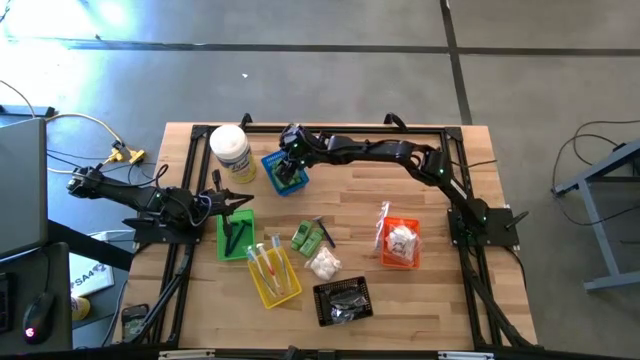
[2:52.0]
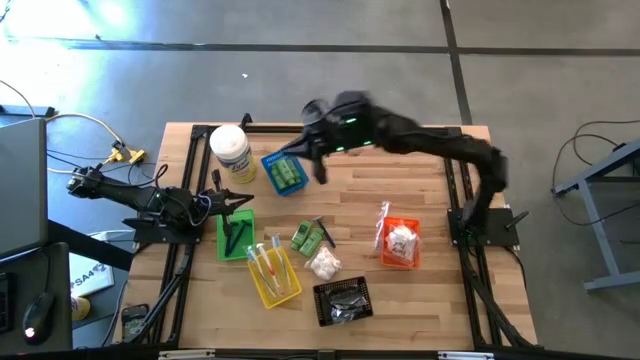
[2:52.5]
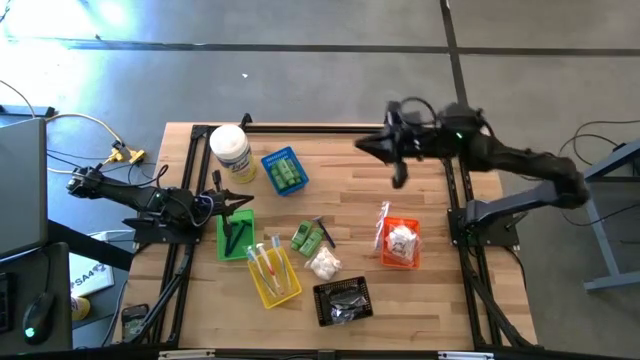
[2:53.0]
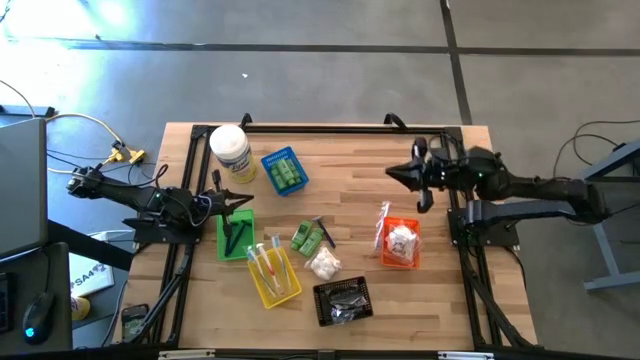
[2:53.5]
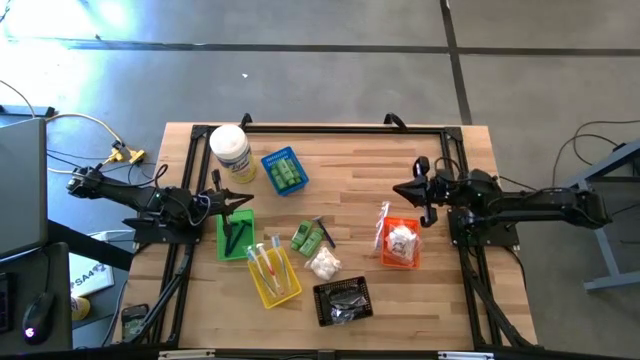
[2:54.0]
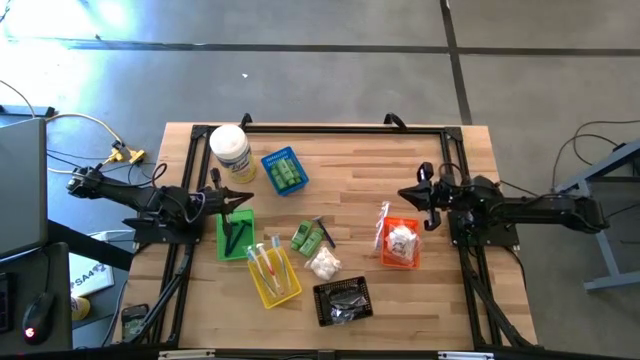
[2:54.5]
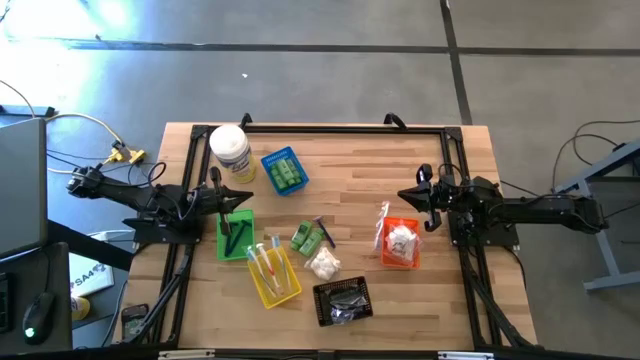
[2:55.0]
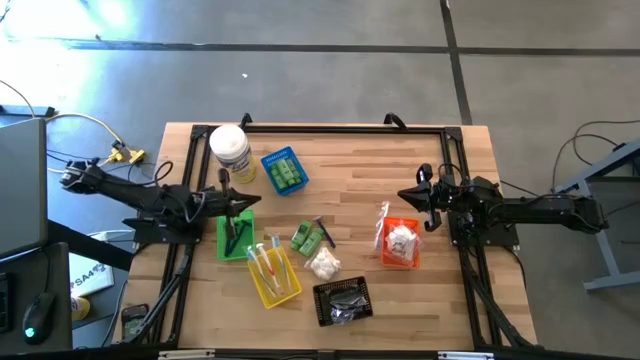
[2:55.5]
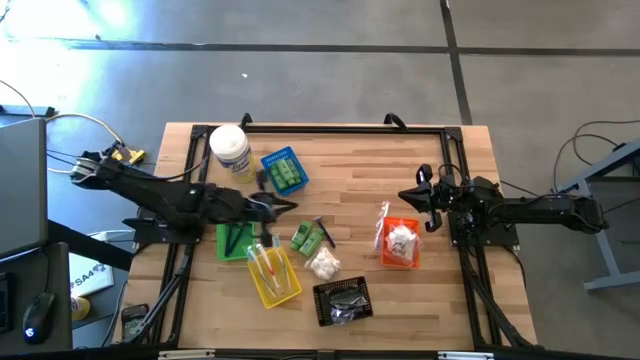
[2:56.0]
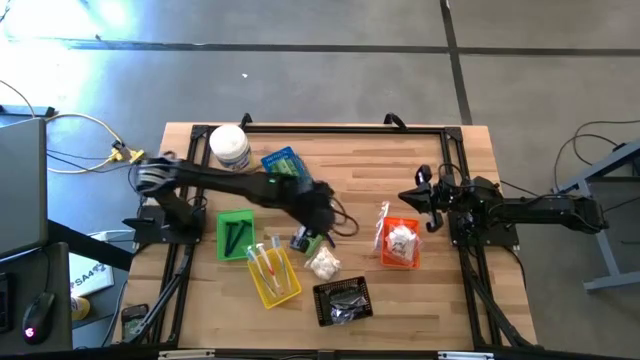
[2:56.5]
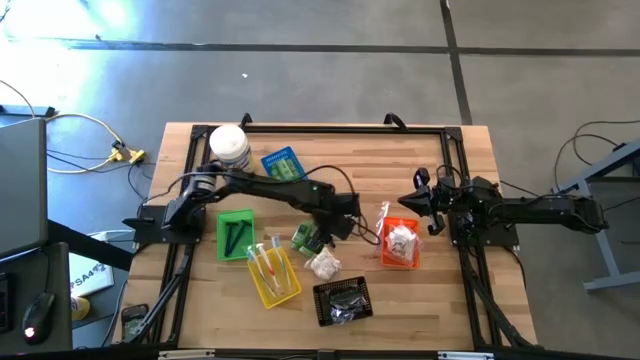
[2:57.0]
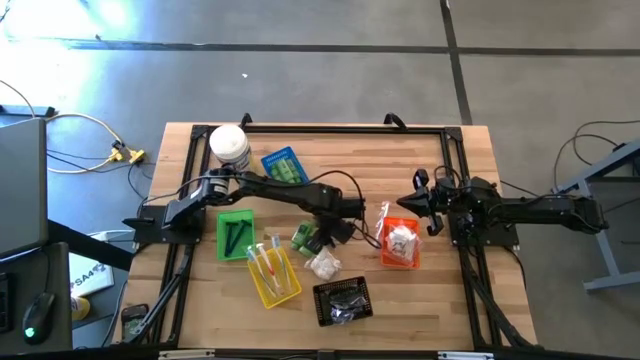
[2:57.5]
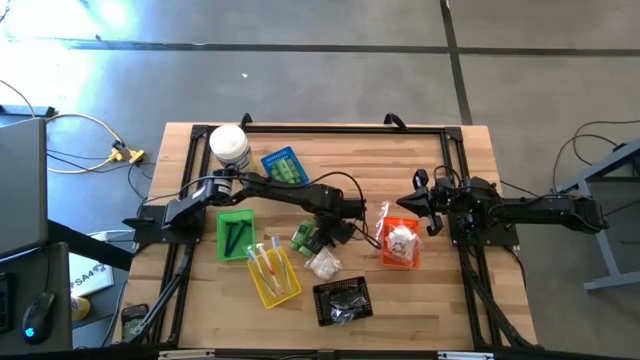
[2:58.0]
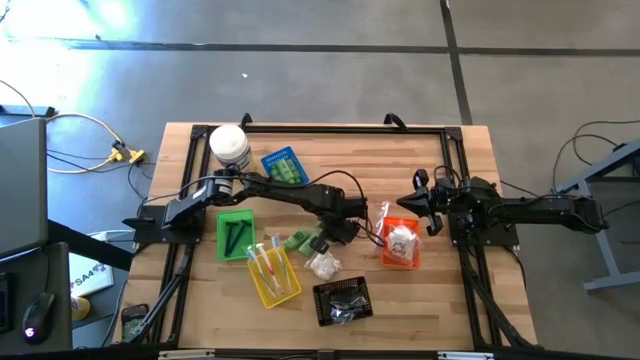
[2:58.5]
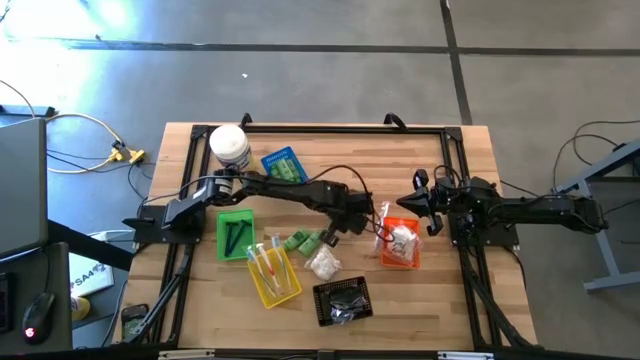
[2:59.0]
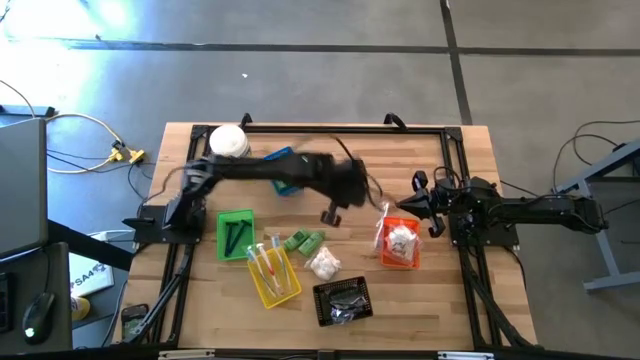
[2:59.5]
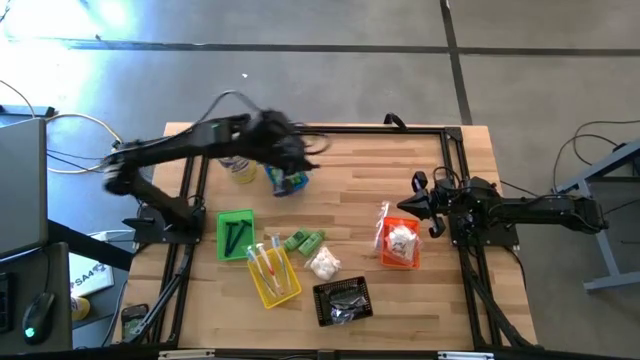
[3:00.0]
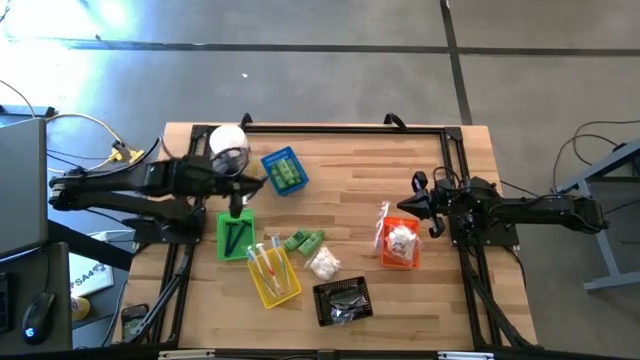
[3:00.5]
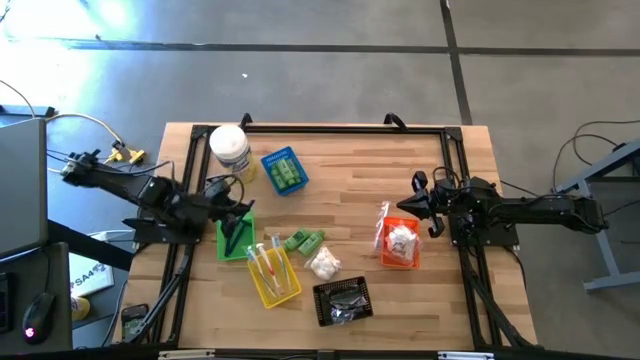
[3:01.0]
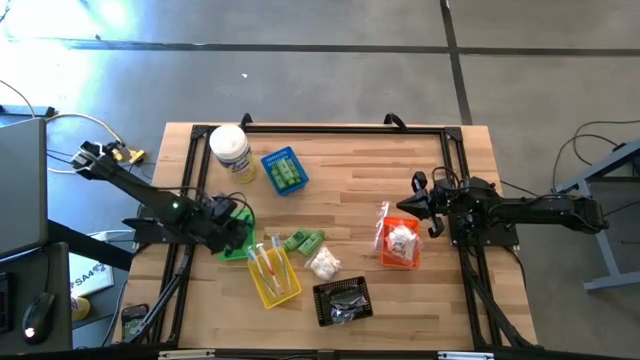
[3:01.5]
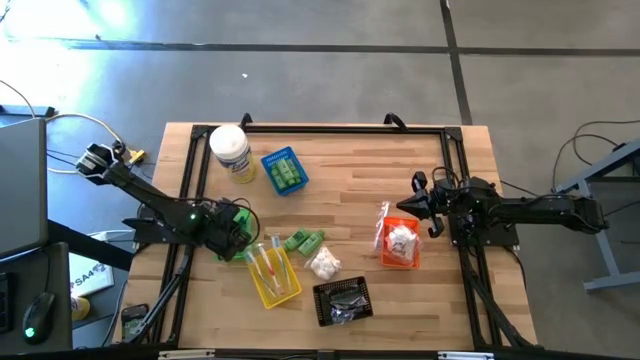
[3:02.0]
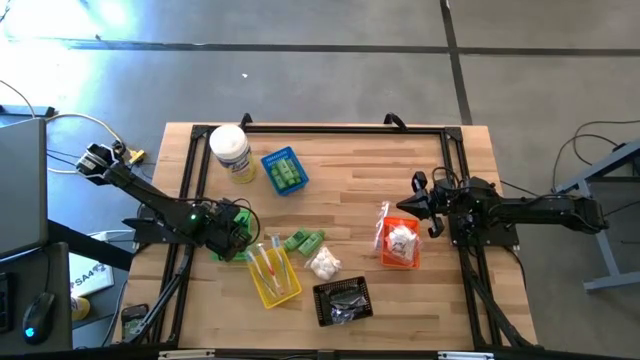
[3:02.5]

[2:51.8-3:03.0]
Task: Pick & Place Travel size toiletries
Put the blue razor into the green bin

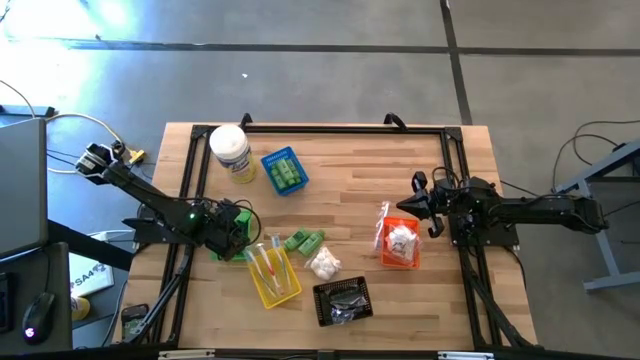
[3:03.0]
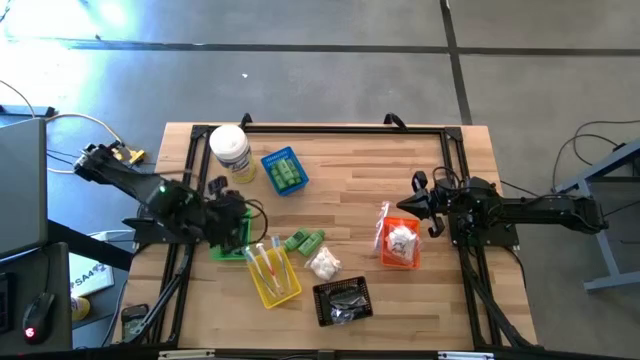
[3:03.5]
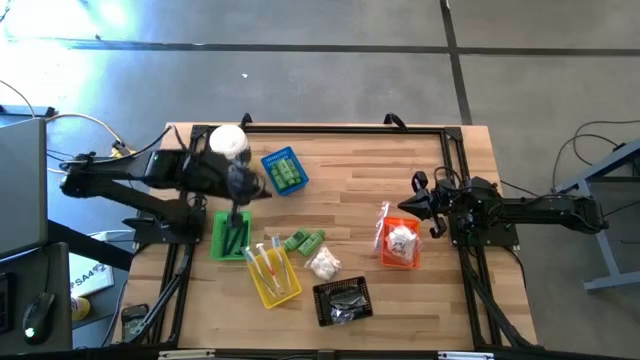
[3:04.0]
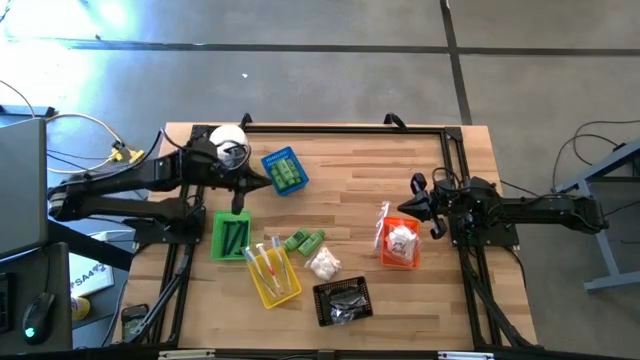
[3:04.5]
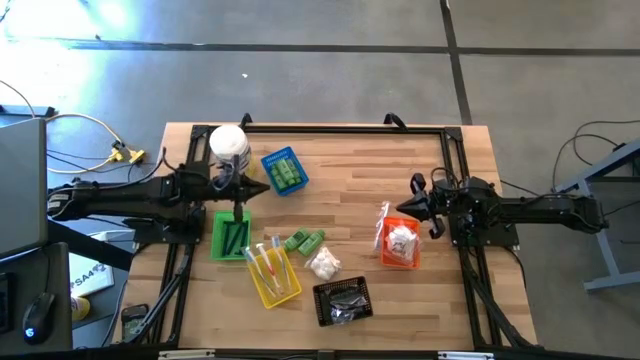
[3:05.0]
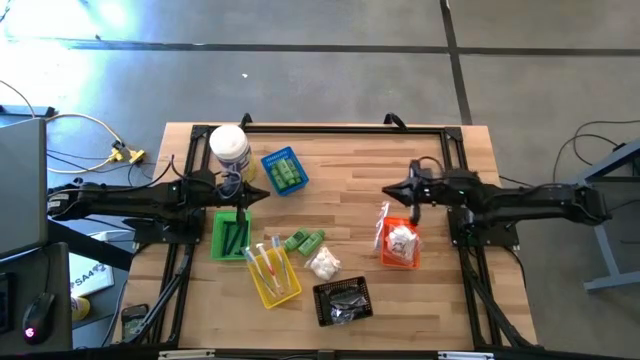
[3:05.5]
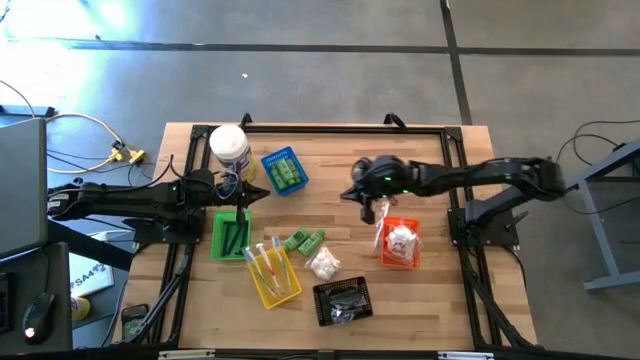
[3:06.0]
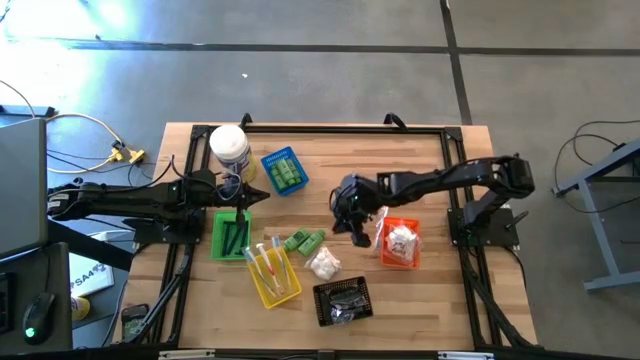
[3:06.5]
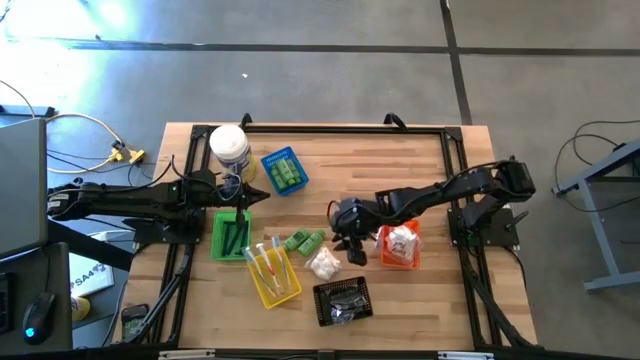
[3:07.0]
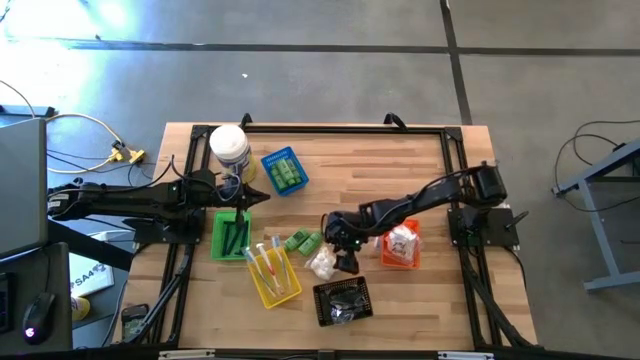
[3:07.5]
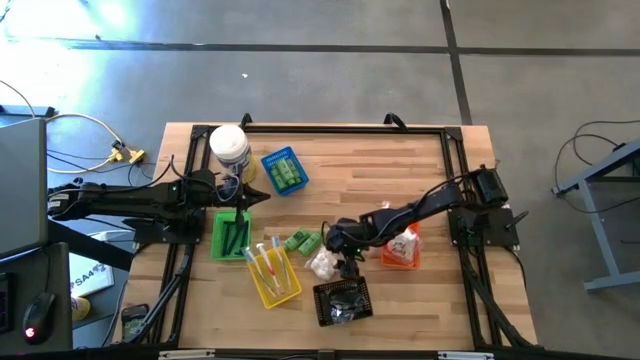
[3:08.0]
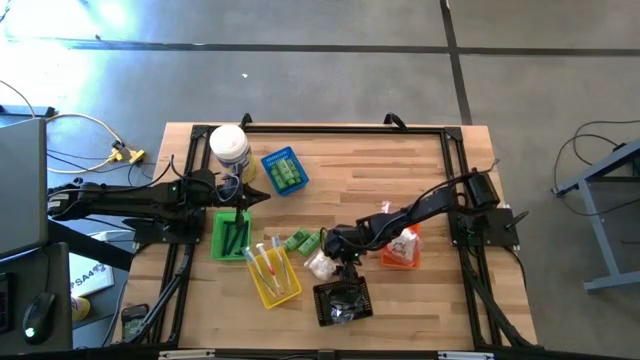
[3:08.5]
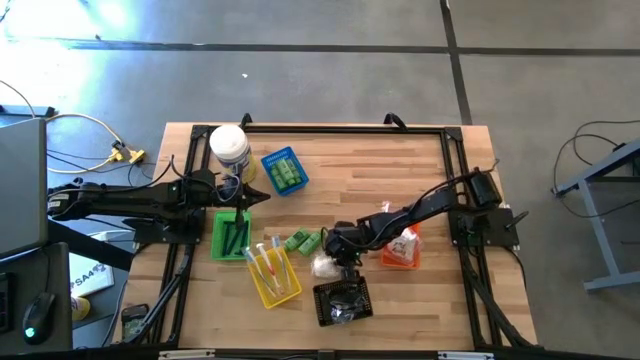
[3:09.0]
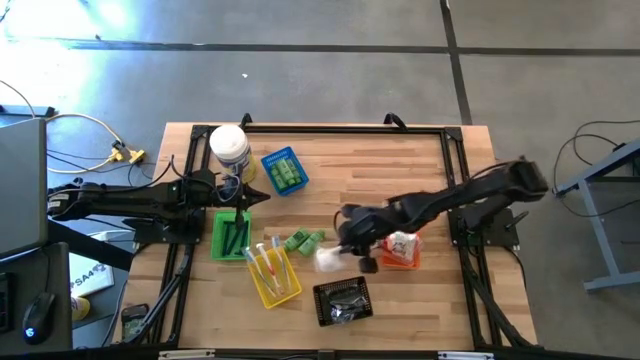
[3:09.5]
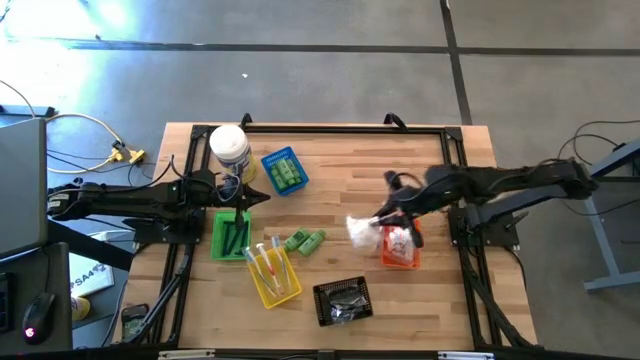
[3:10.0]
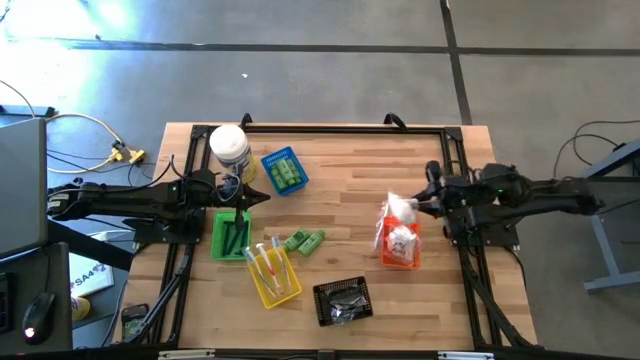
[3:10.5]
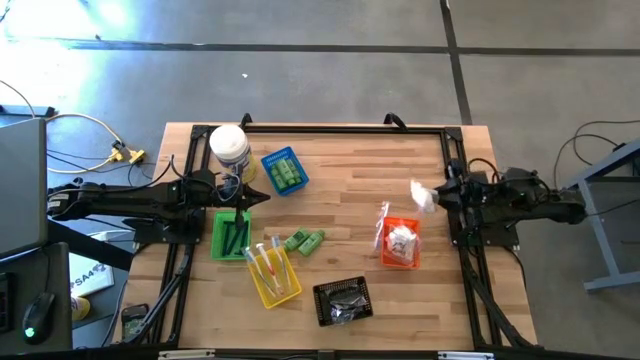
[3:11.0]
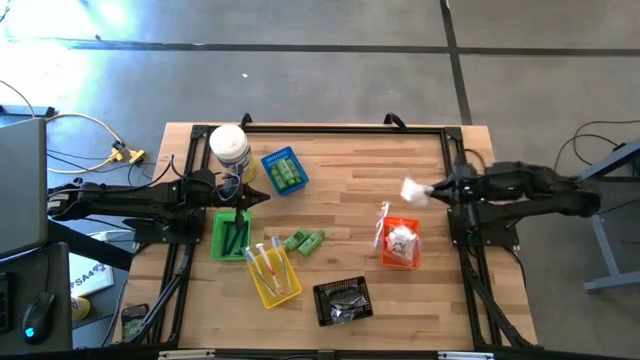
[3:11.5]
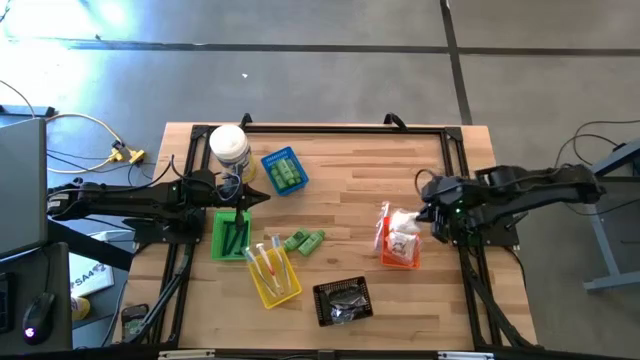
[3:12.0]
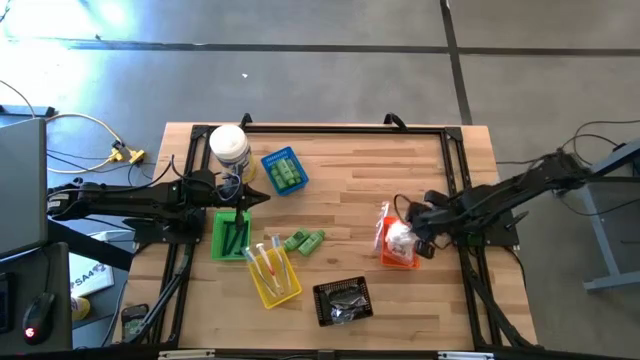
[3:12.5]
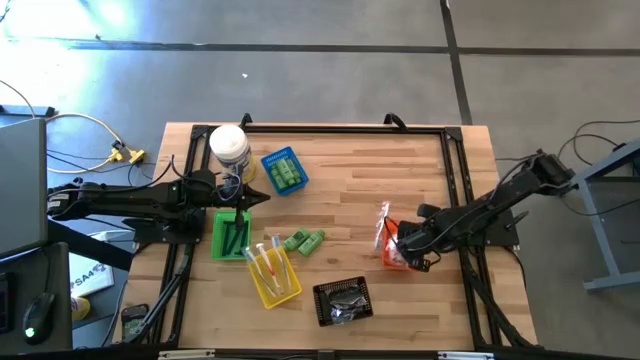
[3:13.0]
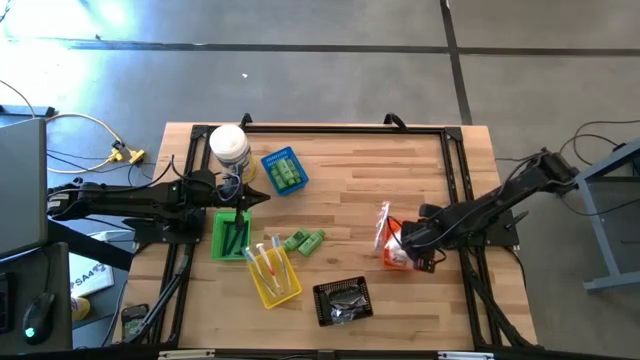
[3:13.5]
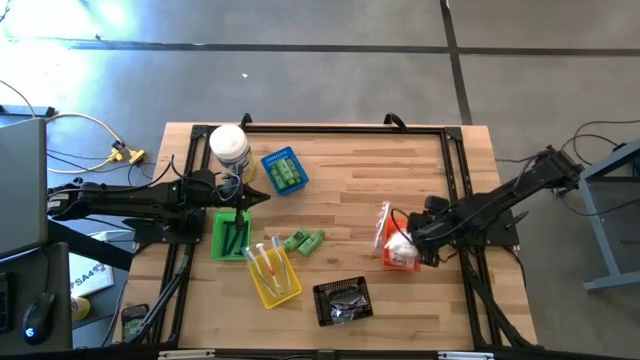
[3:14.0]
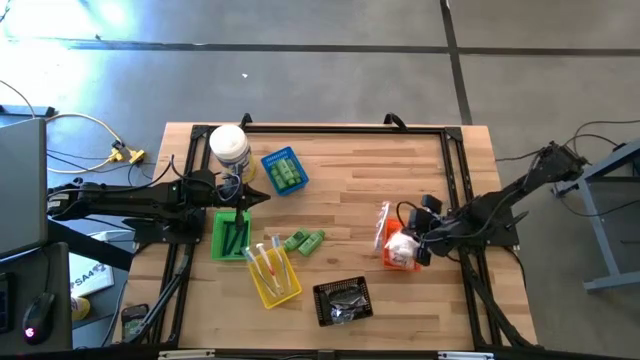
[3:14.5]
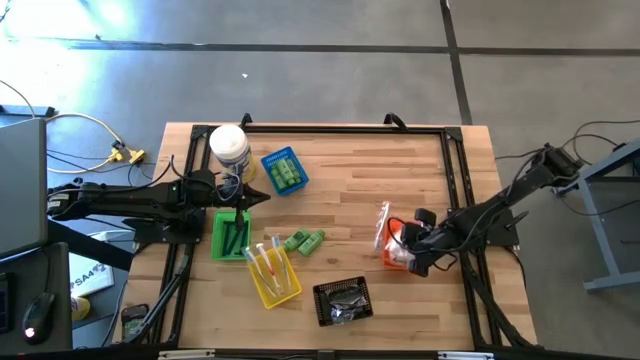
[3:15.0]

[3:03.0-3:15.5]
Put the white cotton pack into the orange bin
